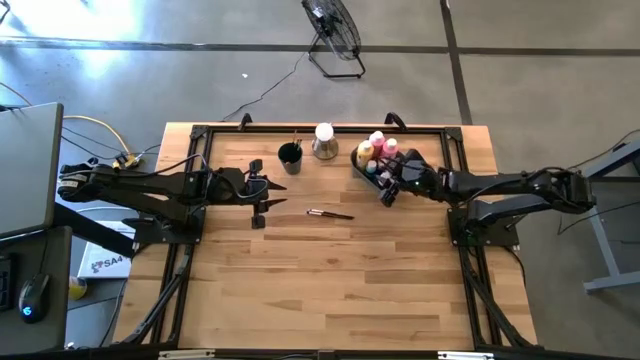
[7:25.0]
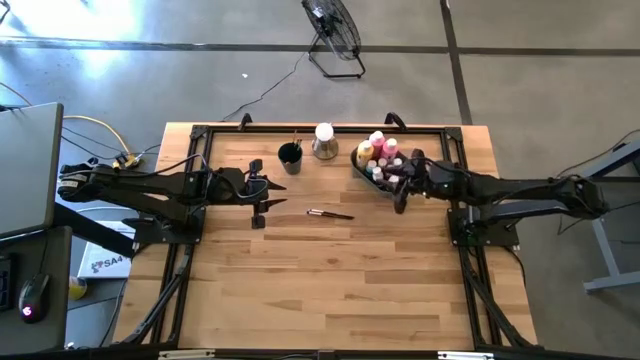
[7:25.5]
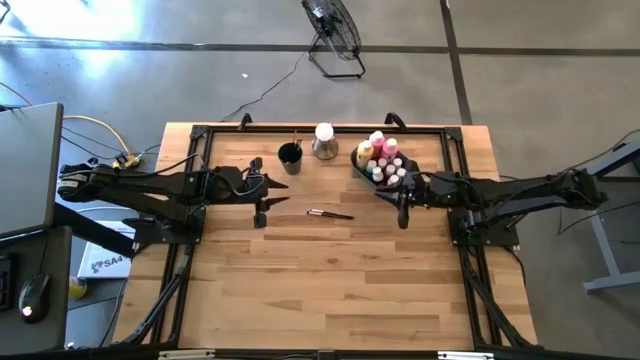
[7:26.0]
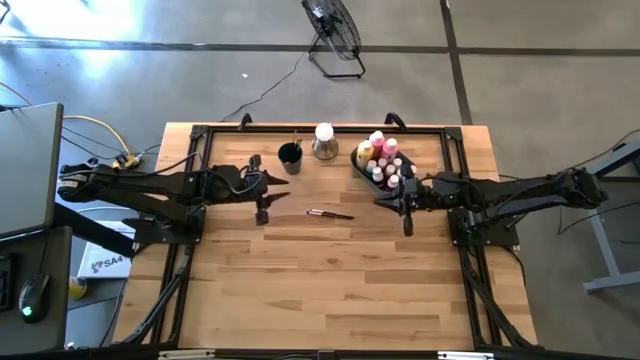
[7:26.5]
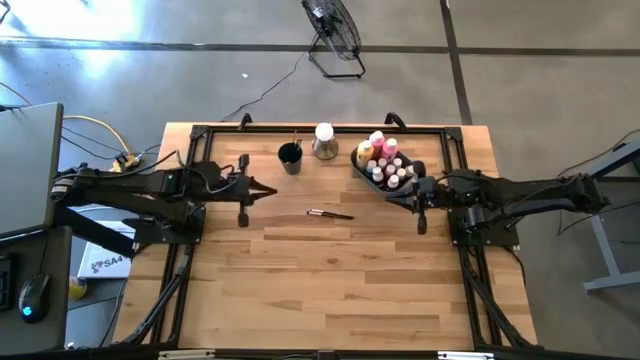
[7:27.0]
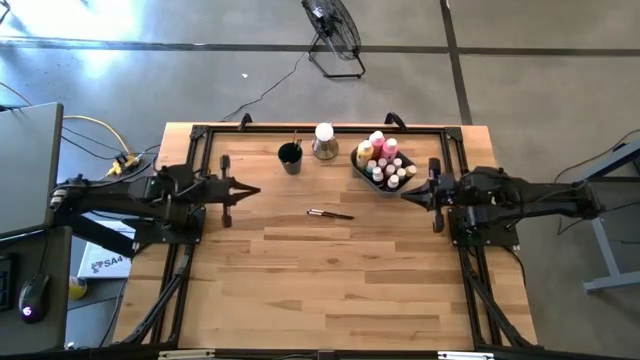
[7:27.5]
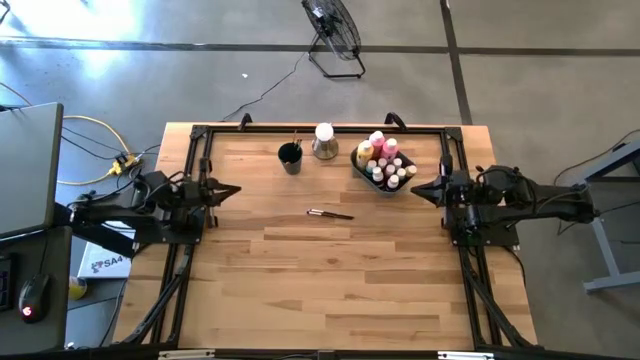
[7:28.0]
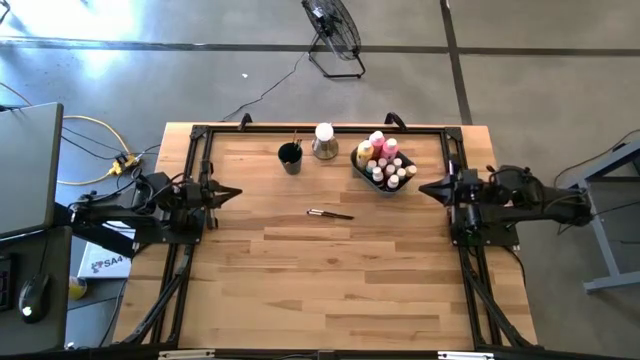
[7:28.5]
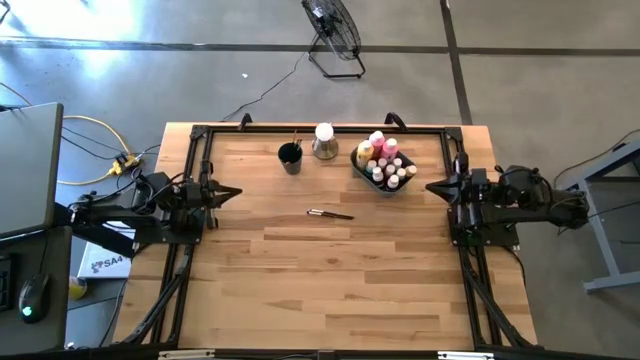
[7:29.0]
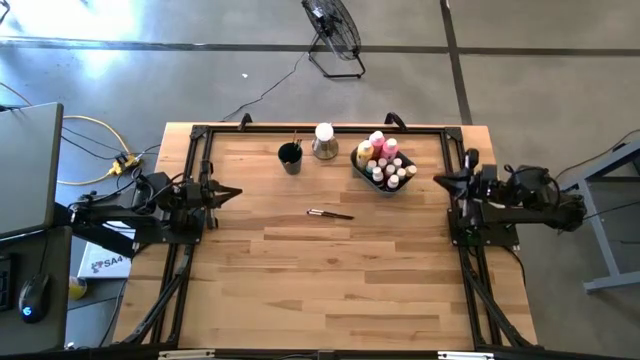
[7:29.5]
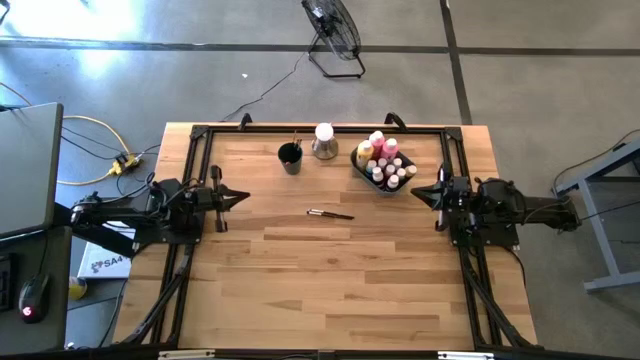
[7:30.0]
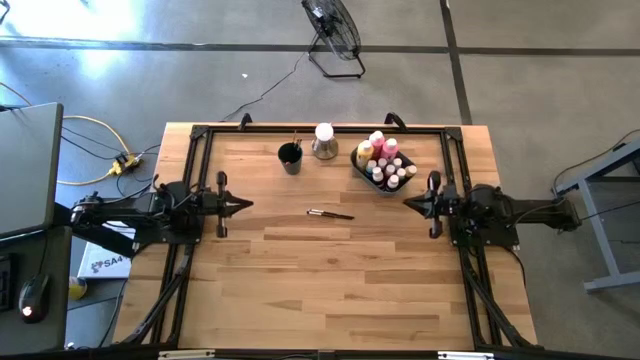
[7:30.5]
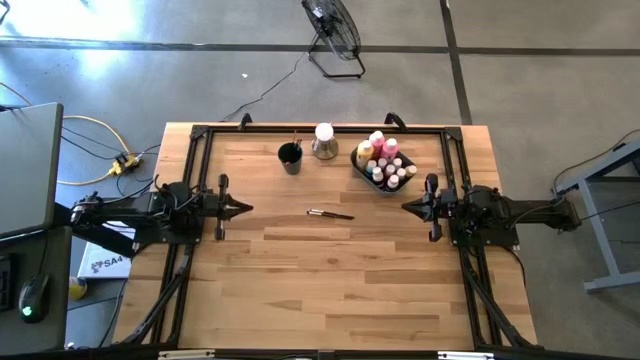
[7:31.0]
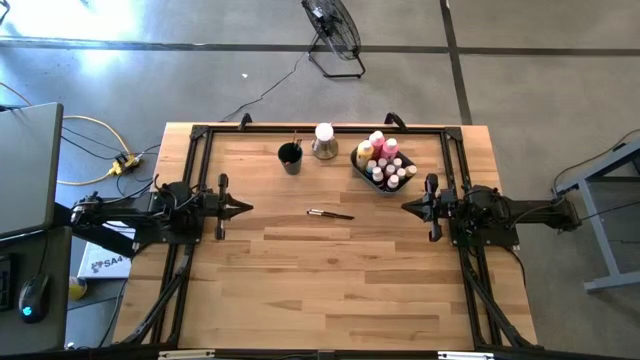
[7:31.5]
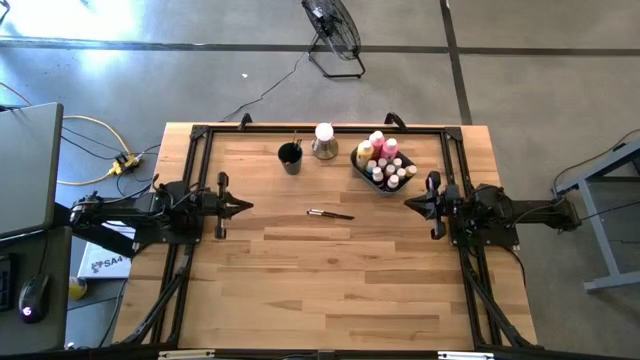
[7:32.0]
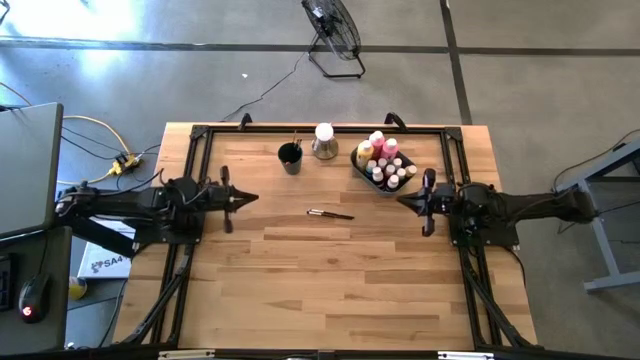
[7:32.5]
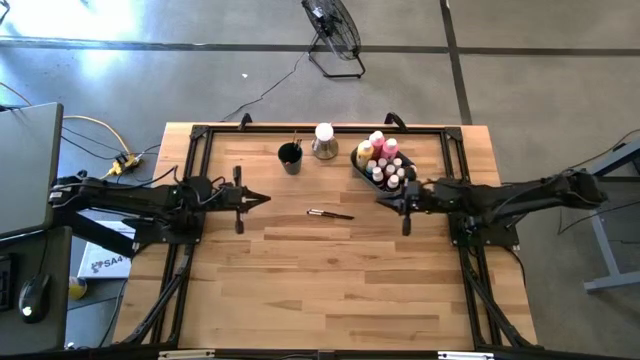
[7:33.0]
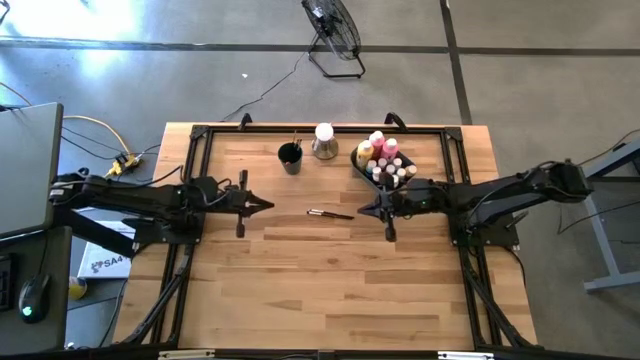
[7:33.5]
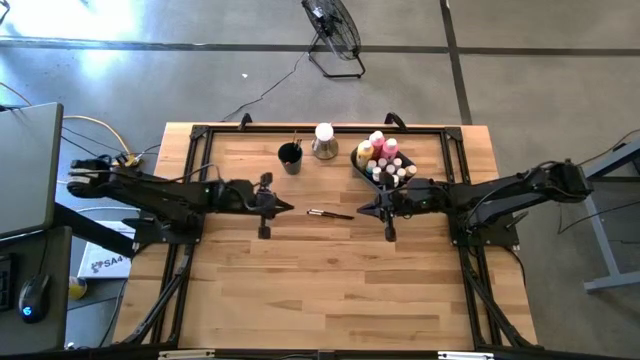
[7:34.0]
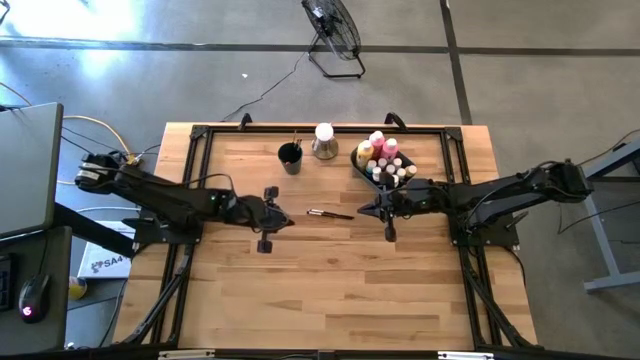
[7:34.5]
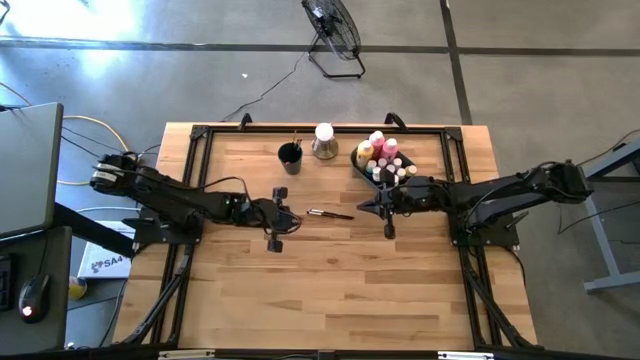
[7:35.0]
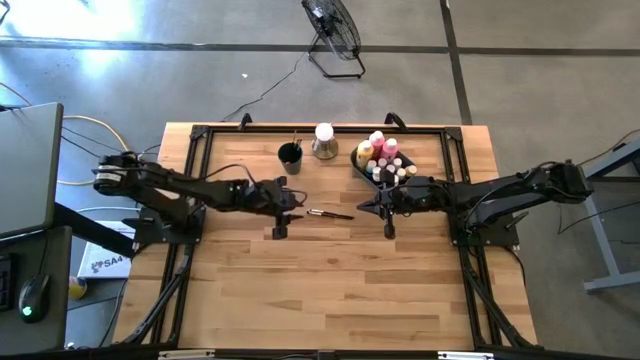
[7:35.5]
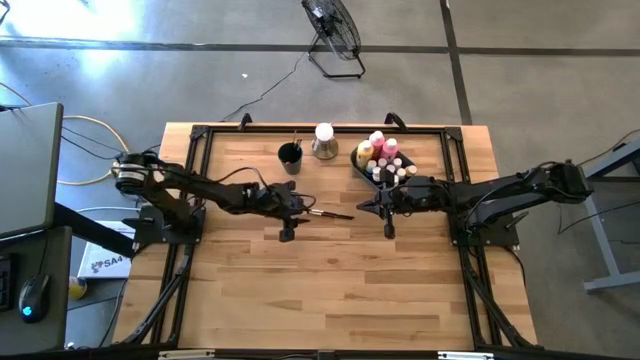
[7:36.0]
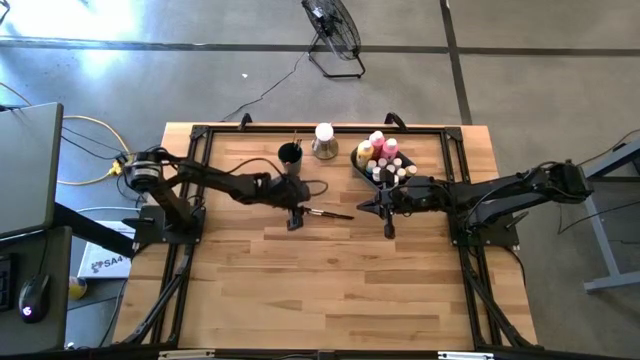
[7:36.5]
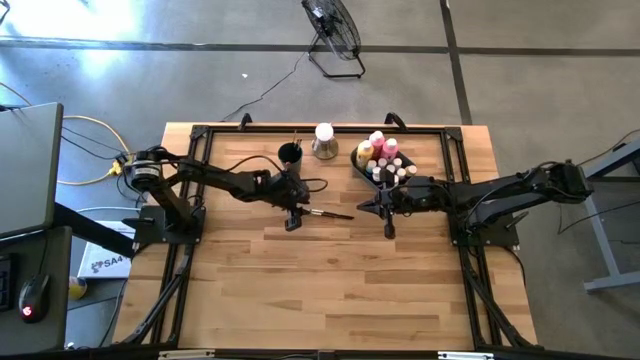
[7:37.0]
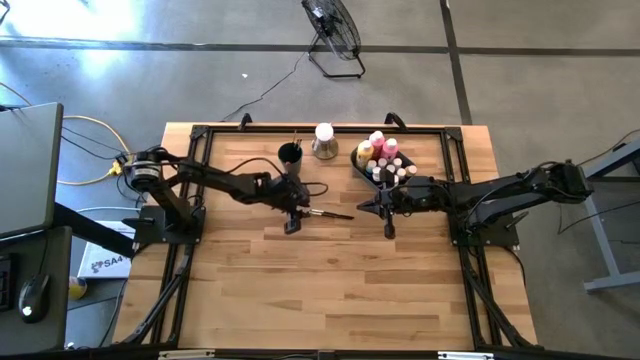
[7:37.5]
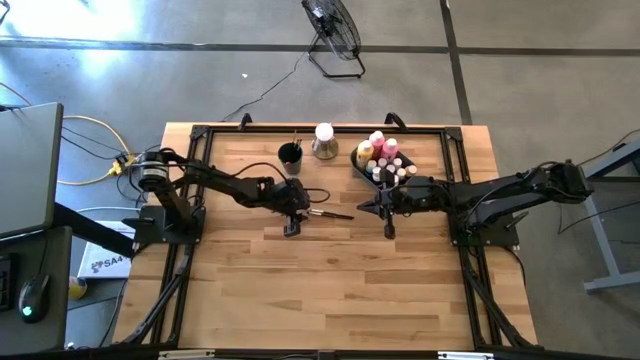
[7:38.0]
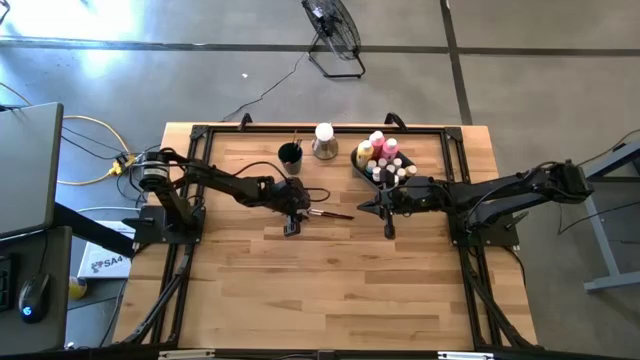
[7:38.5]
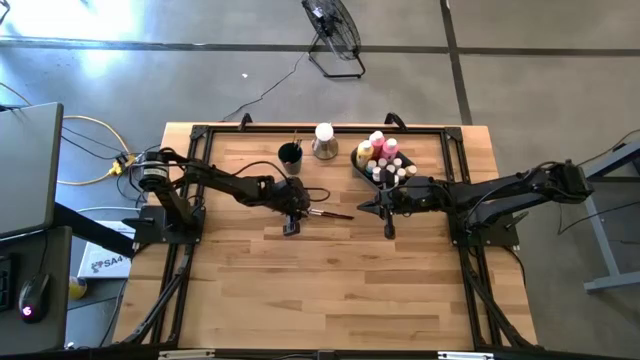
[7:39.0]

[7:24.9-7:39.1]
Task: Pick & Place Paint Supplies
Put the silver paintbrush into the blue cup
